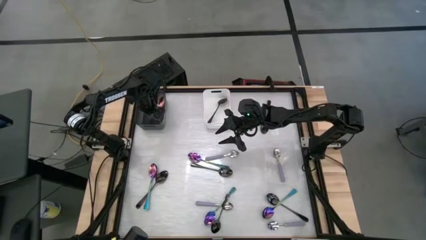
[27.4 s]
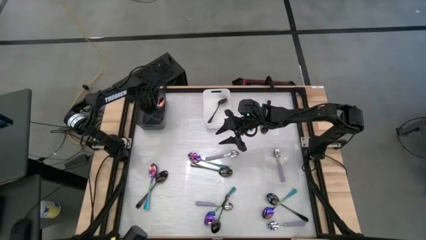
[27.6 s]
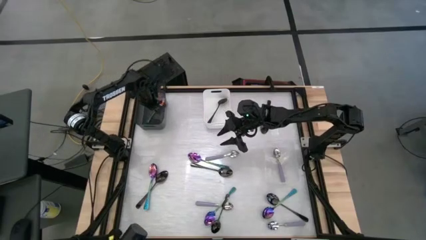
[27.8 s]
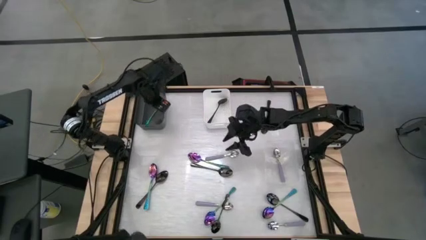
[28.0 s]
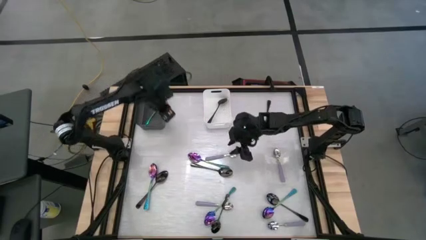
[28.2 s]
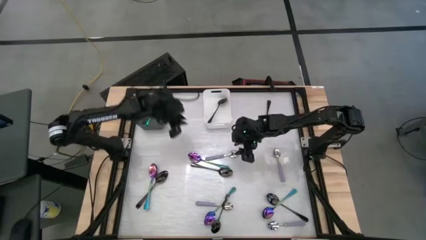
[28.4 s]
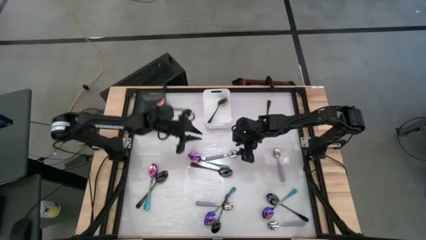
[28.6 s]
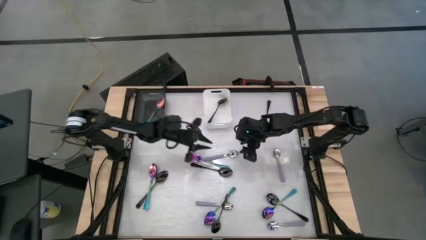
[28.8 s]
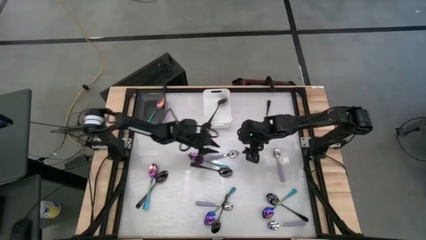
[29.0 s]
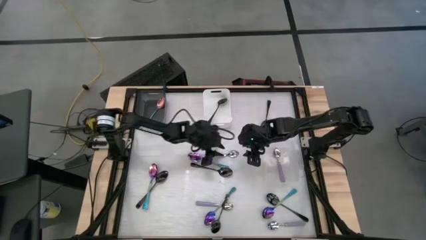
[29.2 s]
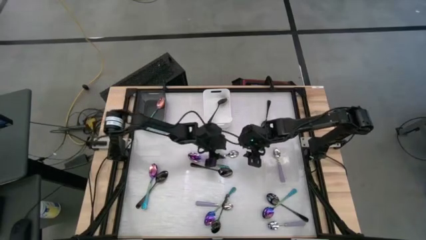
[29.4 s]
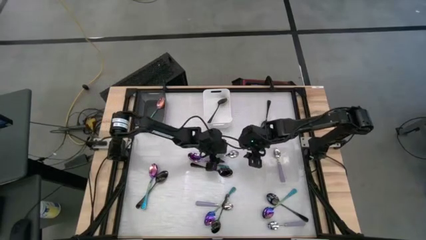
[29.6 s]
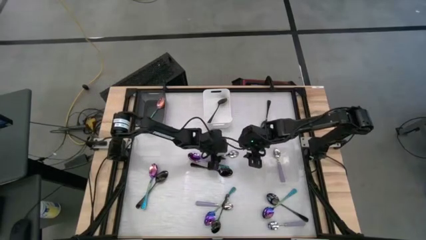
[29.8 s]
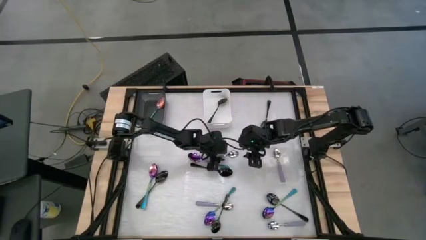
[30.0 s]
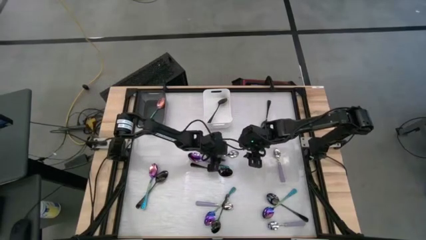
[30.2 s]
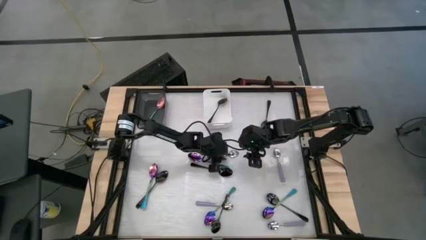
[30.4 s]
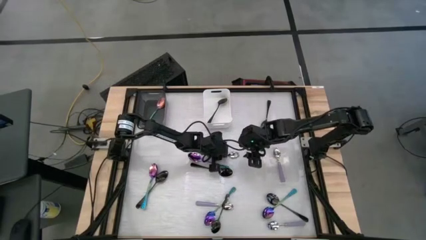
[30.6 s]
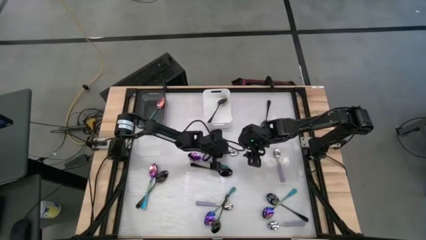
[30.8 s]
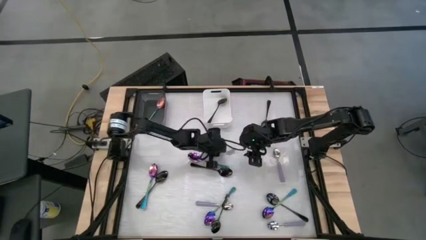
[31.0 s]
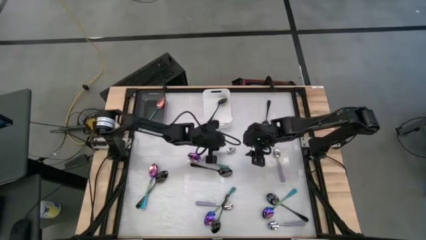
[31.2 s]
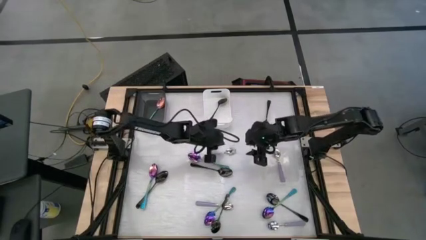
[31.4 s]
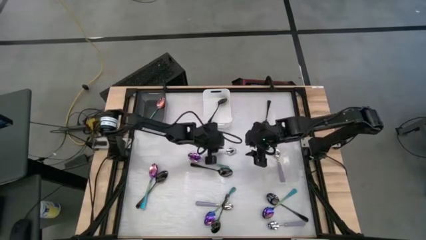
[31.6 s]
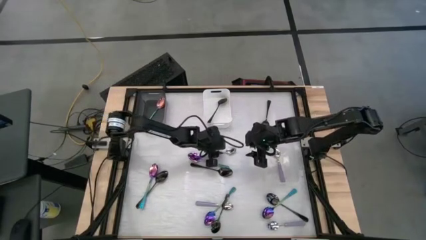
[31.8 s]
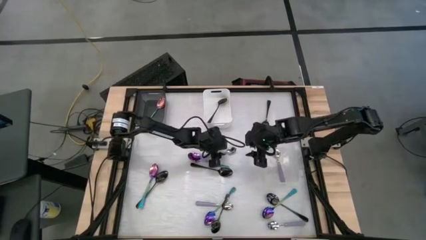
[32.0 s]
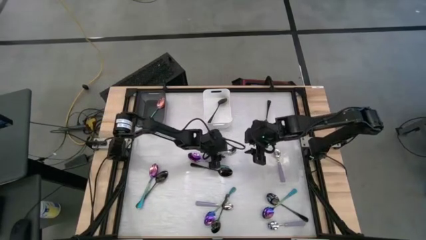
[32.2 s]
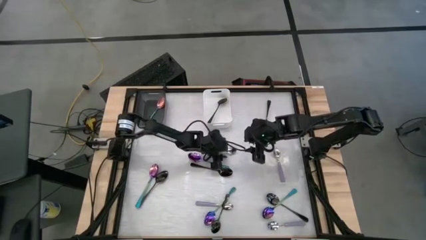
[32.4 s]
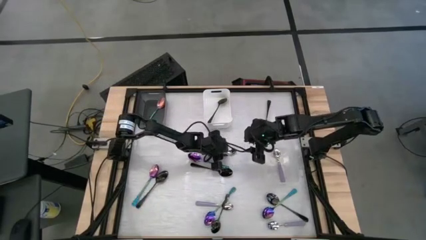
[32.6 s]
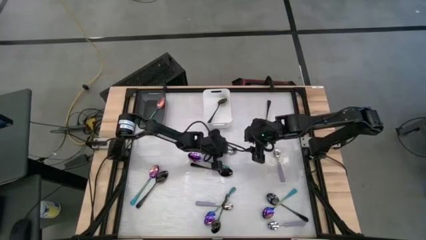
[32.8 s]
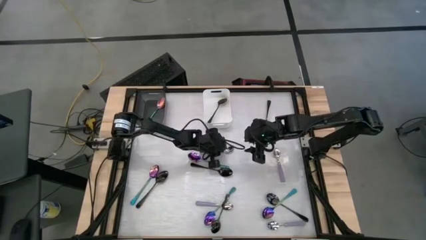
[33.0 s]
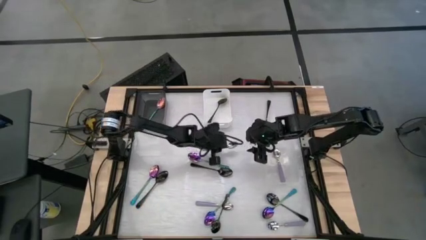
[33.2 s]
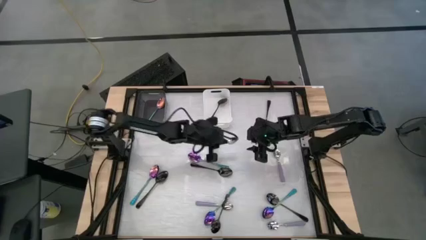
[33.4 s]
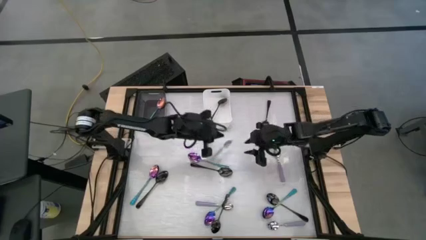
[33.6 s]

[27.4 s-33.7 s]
Task: Sort silverware by color (type)
Put the violet spoon into the transparent bin

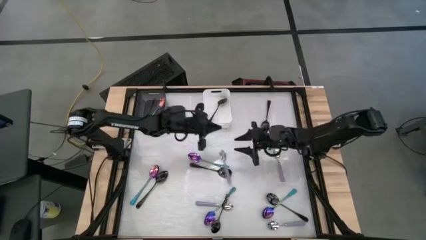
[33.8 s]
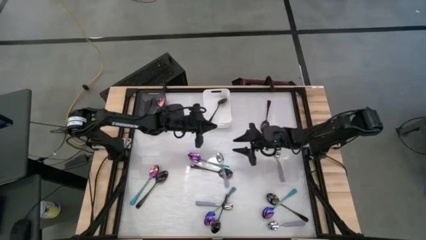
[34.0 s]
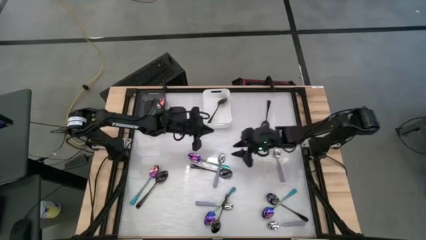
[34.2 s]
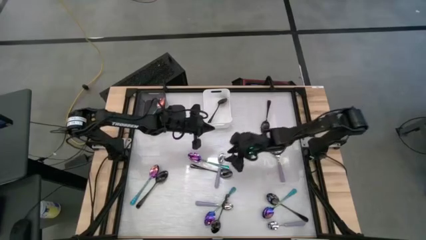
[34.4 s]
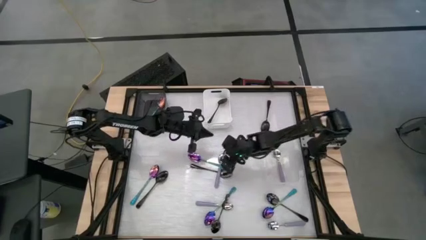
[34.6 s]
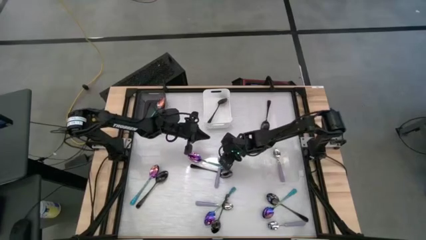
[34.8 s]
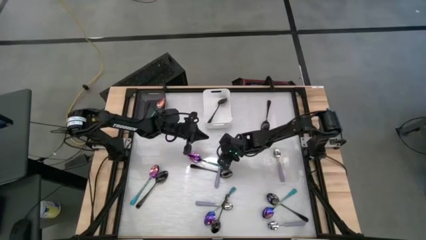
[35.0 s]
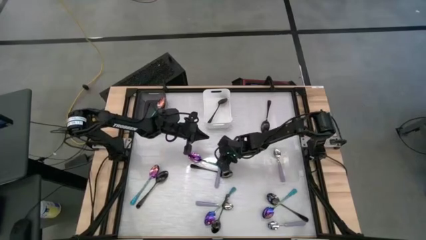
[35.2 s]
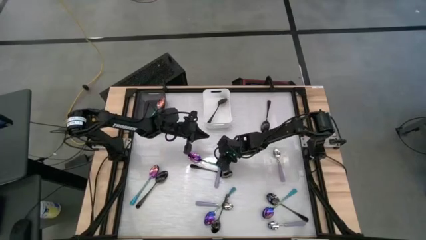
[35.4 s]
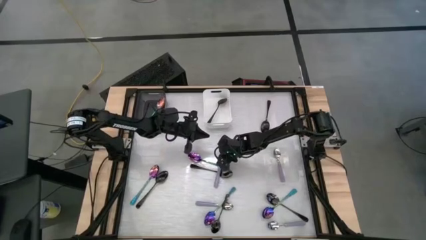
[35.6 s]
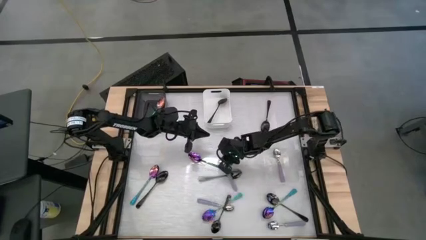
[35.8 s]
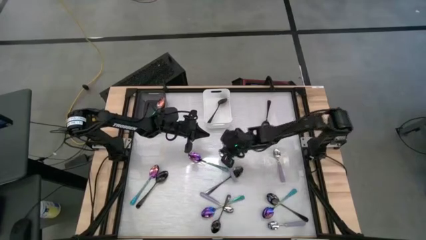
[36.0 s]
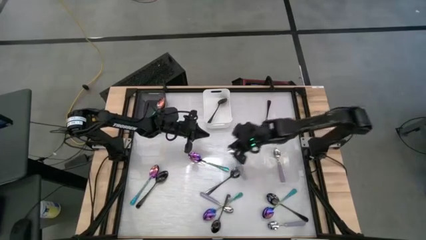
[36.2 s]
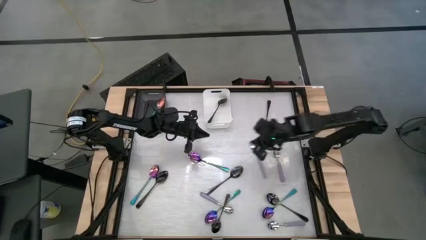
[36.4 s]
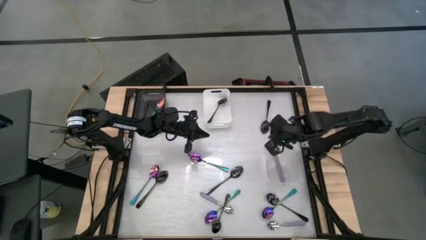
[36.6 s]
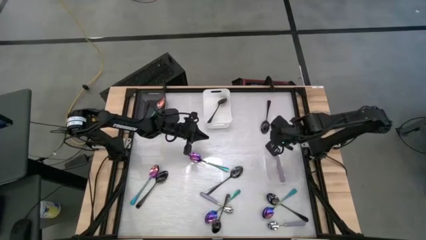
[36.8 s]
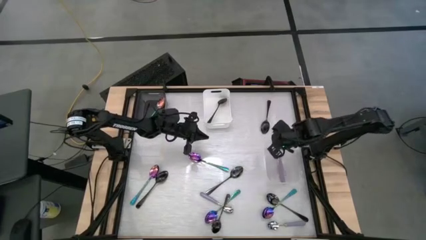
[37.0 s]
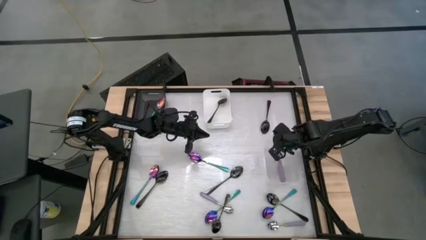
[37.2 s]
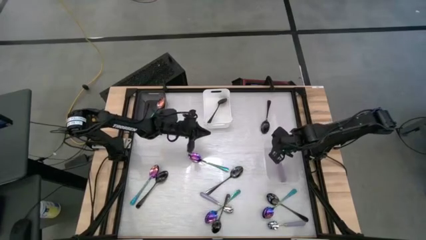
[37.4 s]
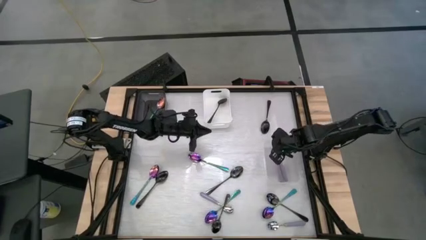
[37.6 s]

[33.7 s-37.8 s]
Put the violet spoon into the transparent bin

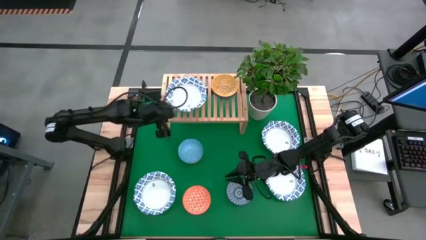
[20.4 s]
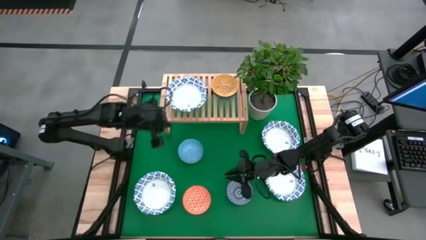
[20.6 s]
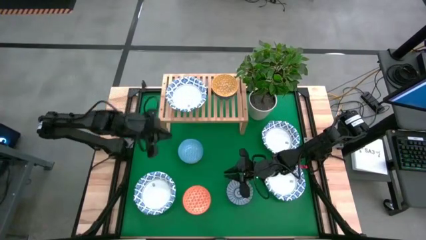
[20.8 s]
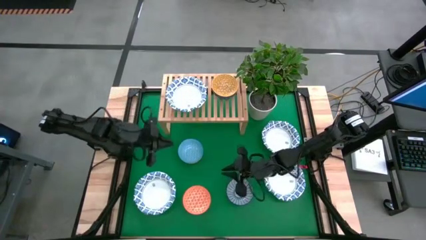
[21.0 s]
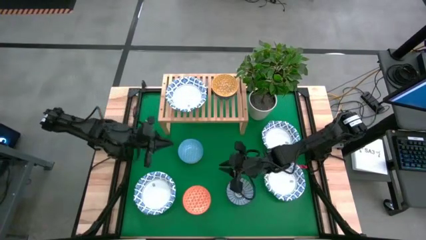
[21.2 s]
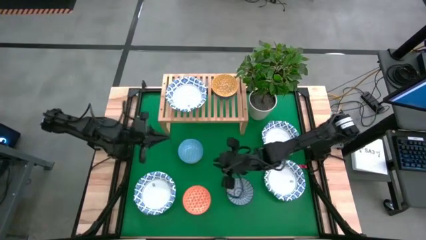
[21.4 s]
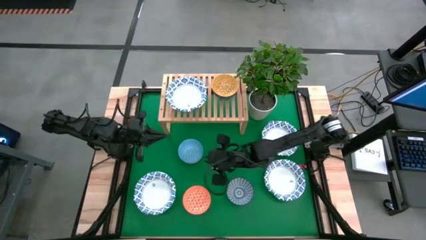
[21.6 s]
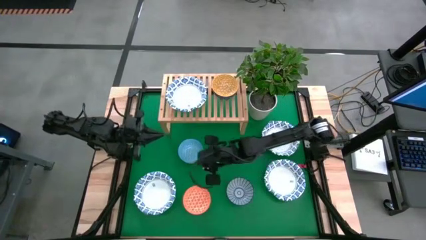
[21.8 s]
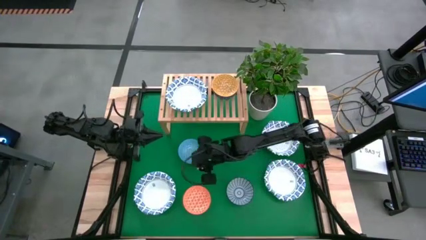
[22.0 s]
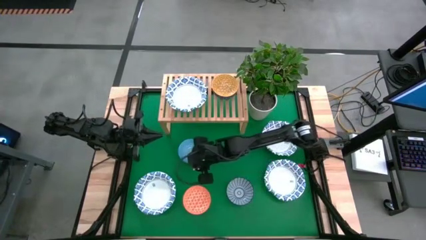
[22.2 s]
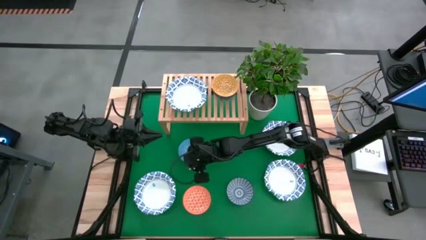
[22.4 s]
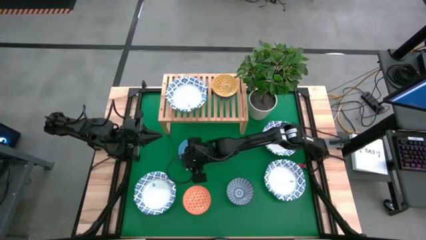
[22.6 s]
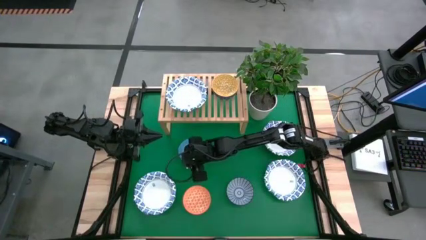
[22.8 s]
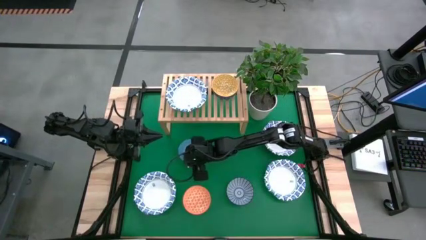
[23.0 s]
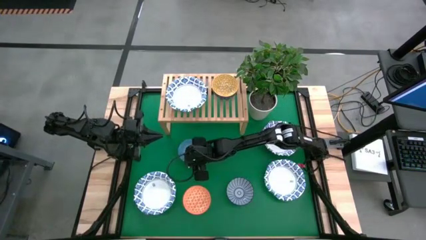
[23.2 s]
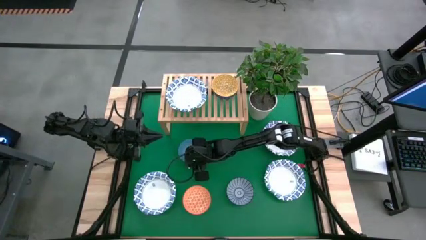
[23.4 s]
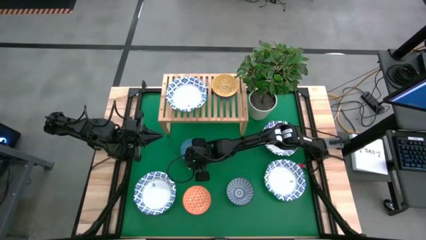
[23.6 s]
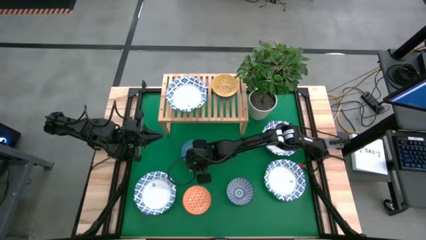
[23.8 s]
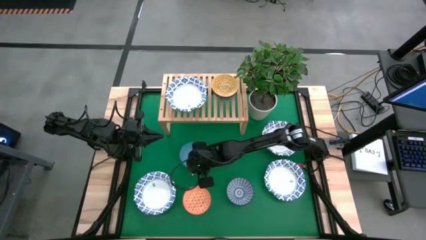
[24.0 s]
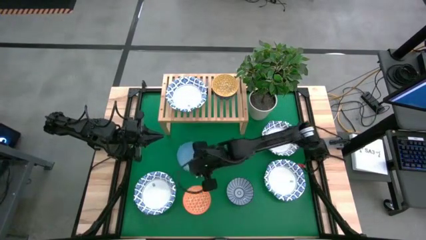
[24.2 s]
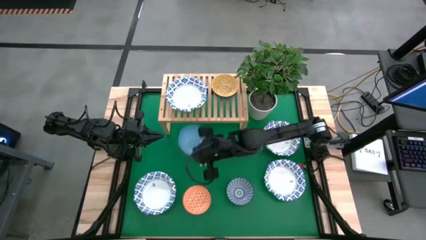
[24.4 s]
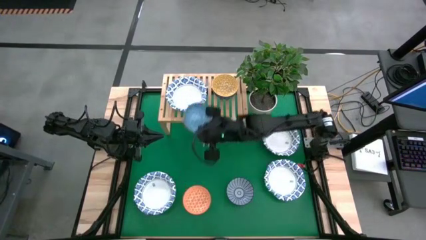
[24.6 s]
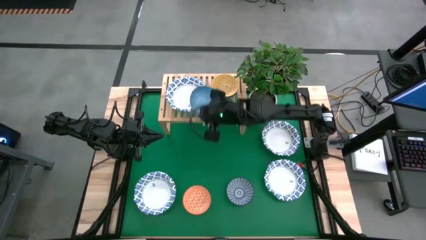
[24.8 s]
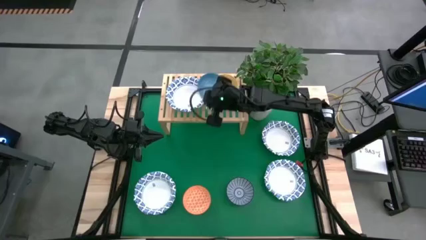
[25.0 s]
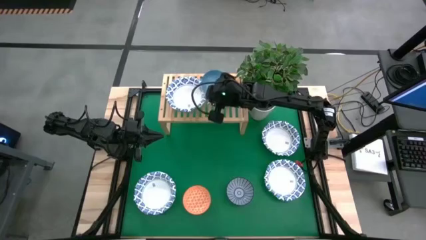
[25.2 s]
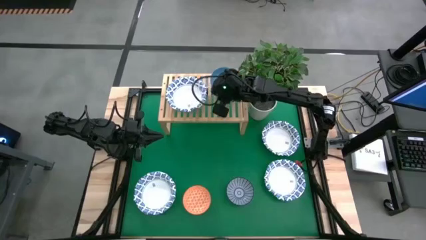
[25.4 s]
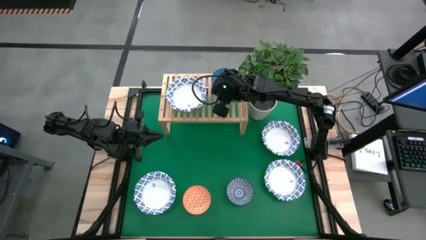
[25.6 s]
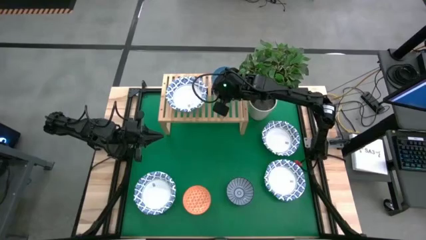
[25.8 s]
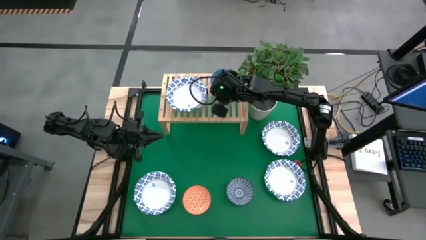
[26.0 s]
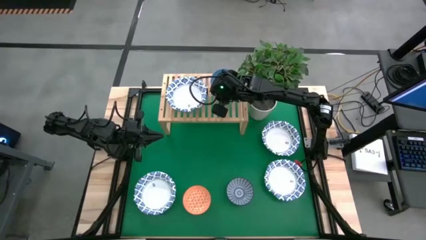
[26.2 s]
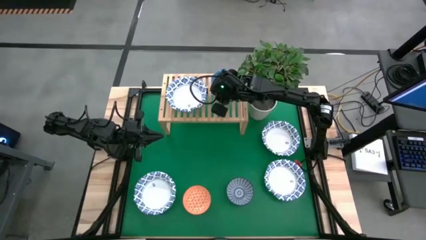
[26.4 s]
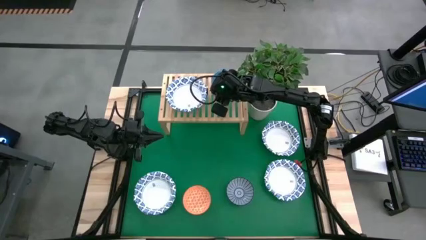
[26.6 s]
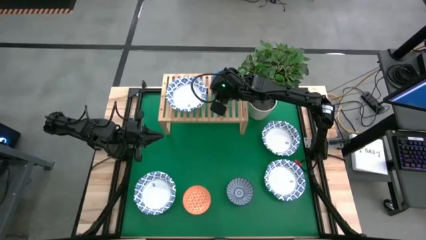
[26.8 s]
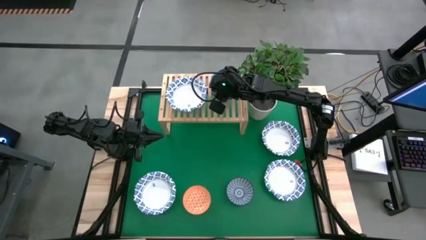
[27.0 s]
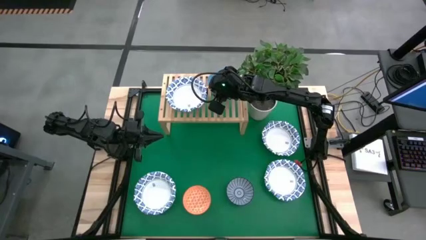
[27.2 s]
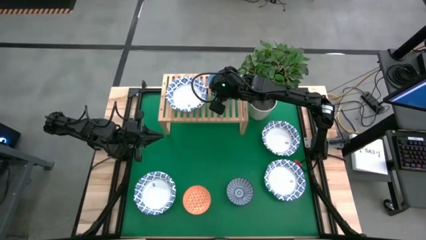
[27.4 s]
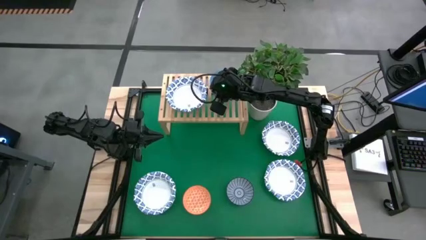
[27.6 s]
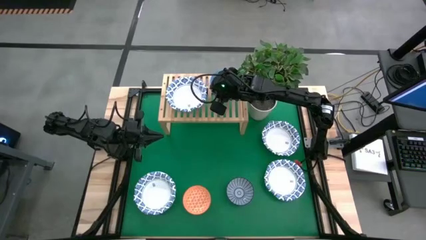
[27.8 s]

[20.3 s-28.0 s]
Task: Place and stack bowls onto a shelf
Stack the small light blue bowl on the small yellow bowl on the shelf
